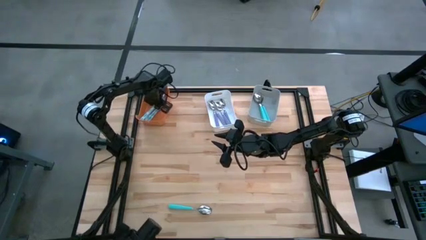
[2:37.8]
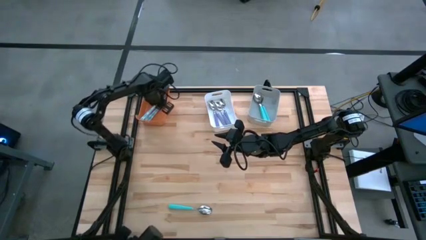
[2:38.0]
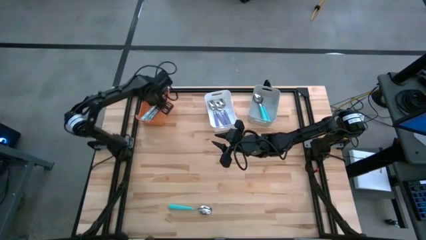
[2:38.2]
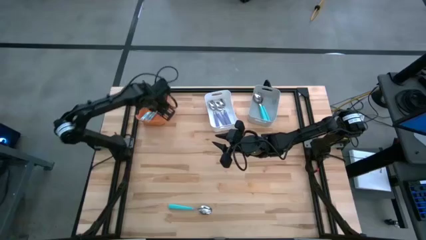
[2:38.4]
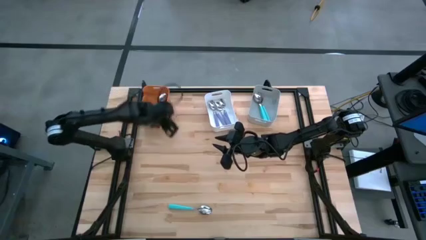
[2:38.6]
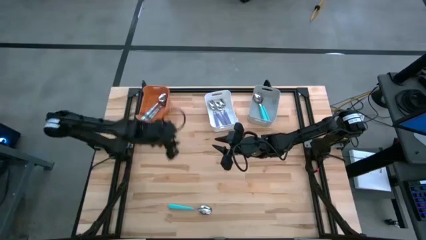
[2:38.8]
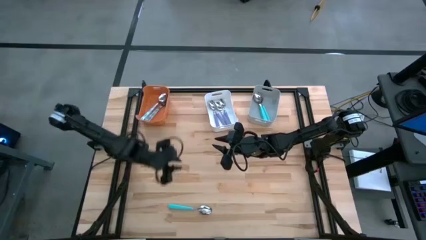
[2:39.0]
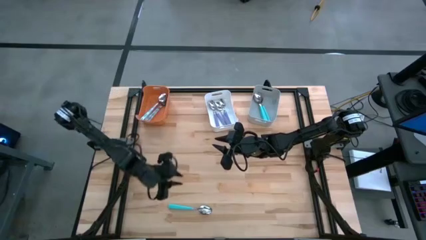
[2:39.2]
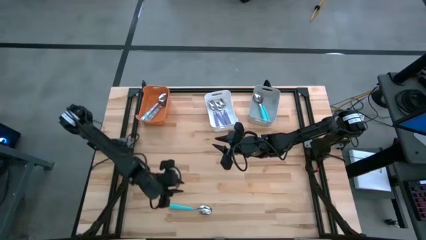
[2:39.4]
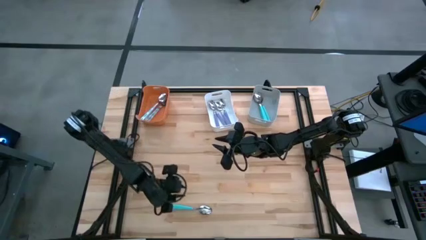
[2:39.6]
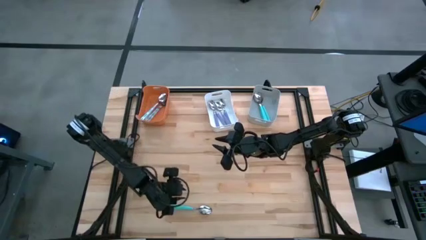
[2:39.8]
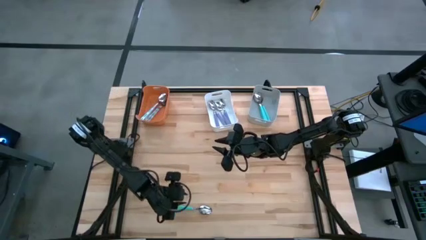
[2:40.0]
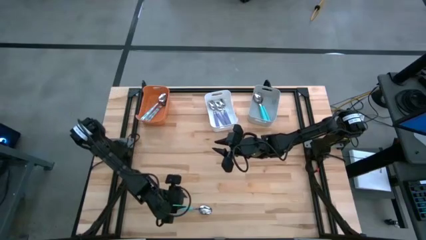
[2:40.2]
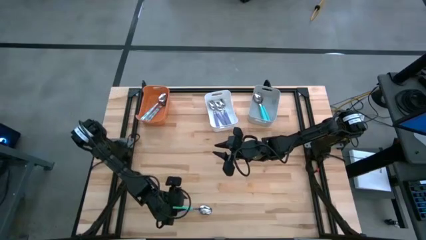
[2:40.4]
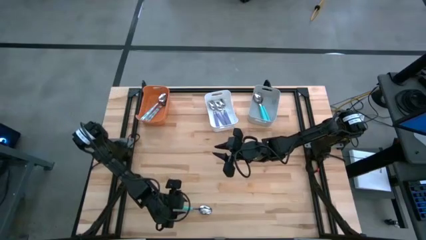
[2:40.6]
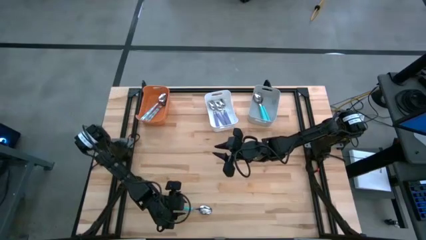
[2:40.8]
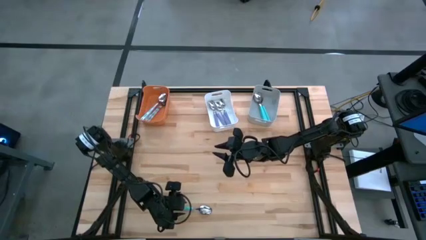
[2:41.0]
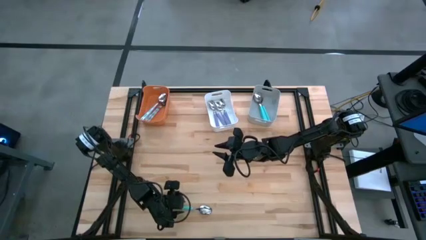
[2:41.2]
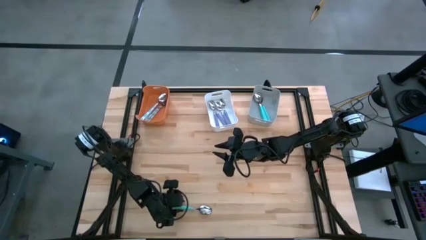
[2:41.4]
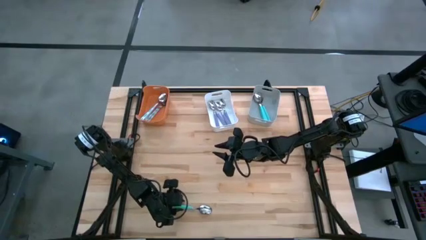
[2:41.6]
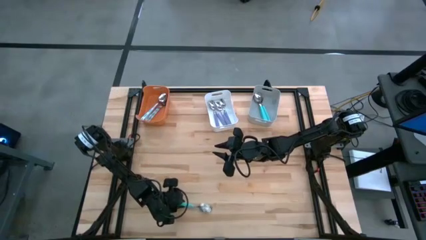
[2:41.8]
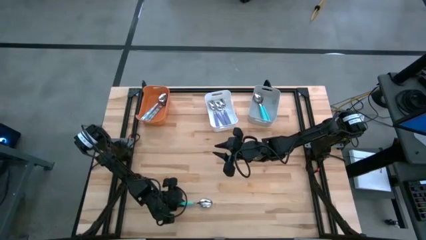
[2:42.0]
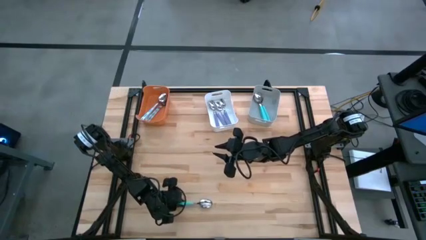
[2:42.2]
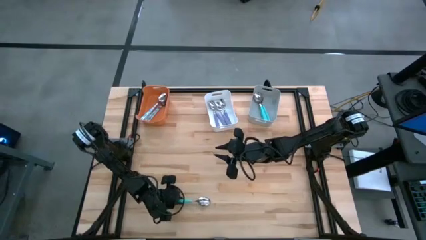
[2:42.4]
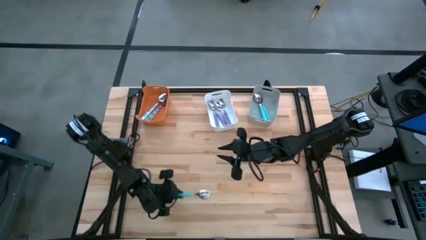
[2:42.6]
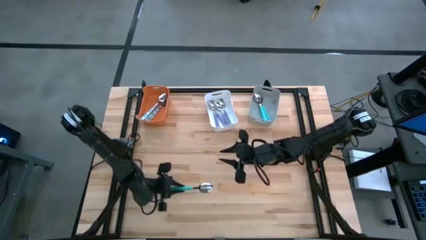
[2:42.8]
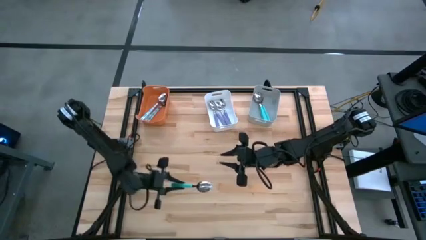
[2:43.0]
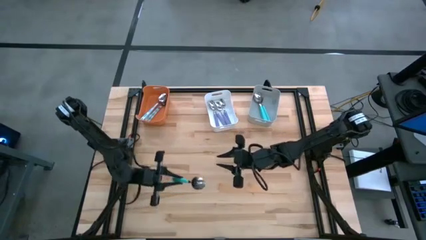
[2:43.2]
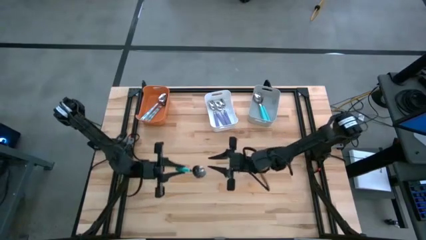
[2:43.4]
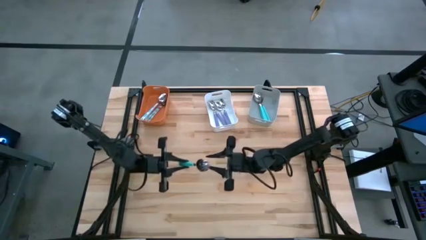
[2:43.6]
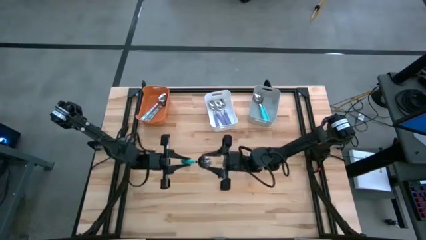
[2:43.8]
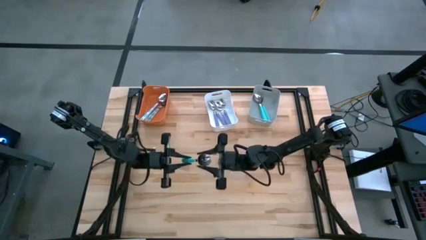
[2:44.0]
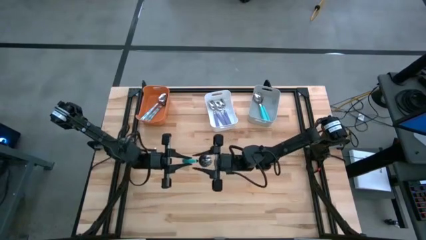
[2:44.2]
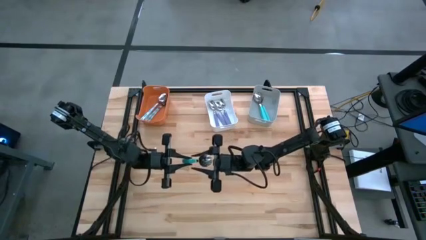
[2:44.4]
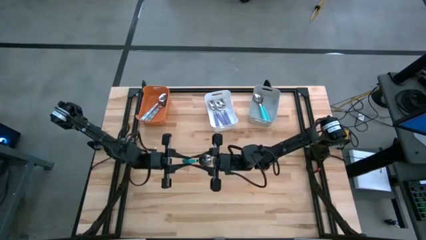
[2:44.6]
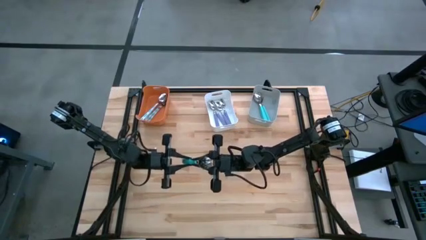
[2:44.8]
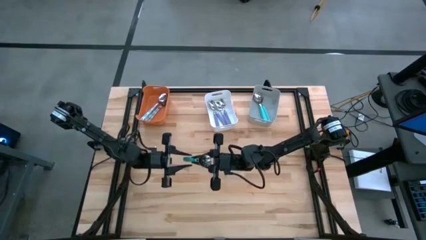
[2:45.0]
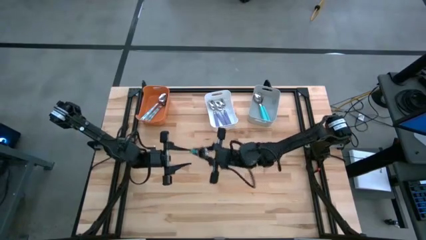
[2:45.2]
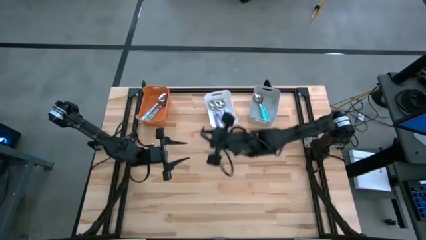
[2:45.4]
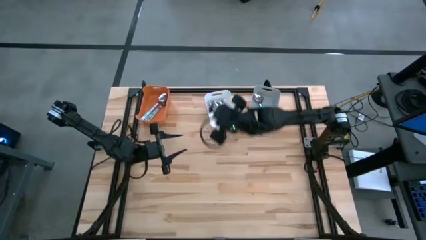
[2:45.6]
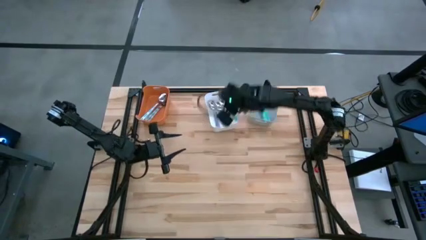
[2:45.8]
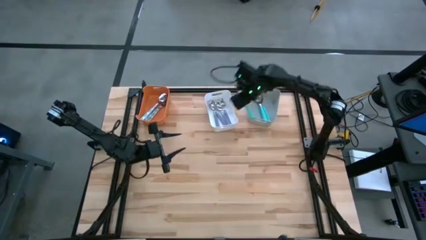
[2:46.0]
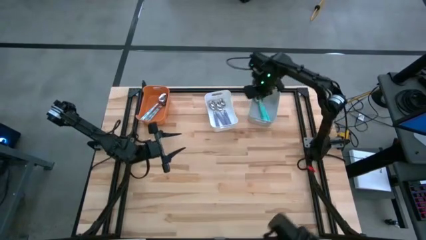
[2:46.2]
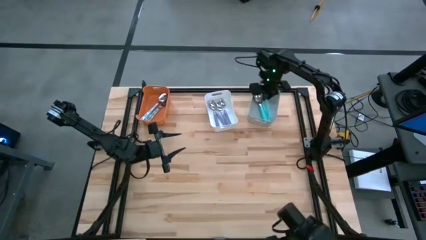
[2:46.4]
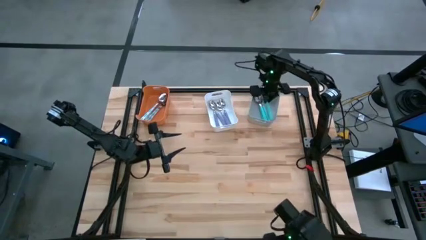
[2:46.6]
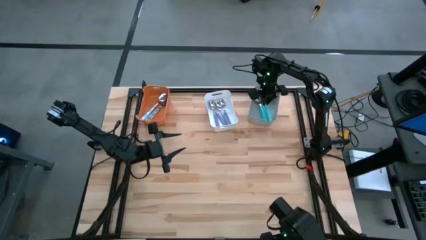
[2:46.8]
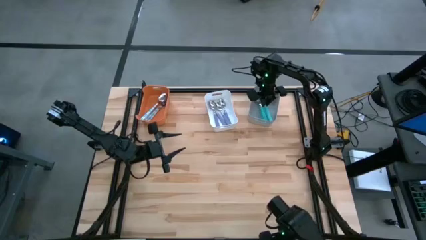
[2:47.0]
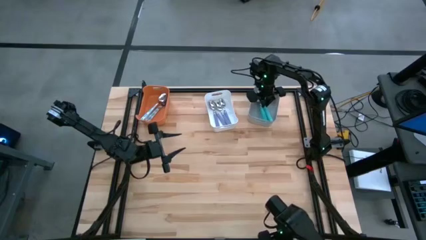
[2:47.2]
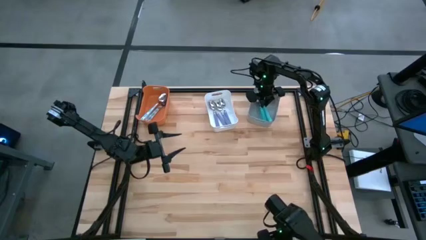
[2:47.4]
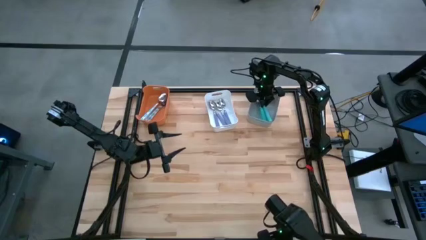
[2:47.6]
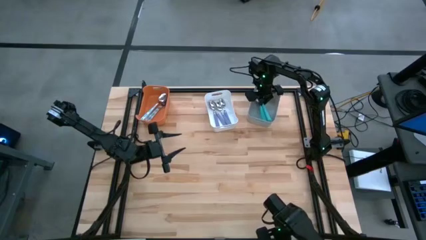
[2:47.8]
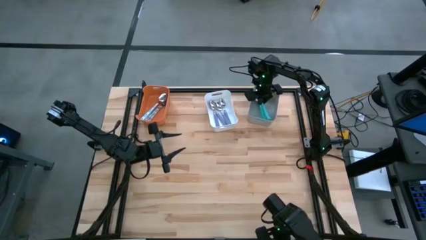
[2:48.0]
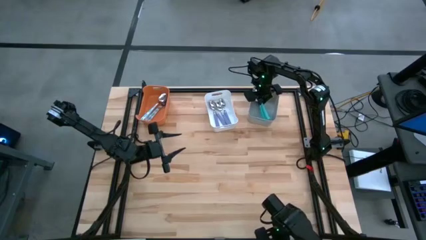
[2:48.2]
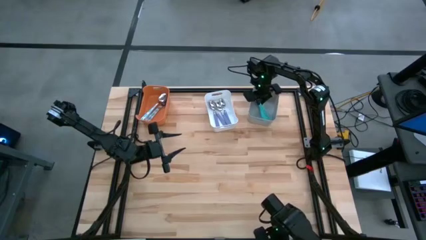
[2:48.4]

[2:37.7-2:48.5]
Task: Sort silverware by color (type)
Put the blue spoon into the gray bin

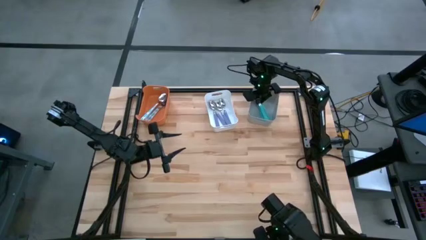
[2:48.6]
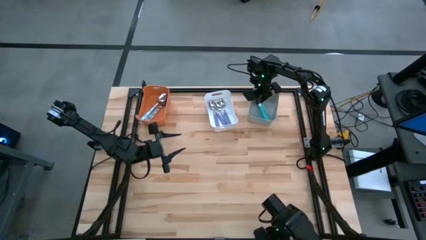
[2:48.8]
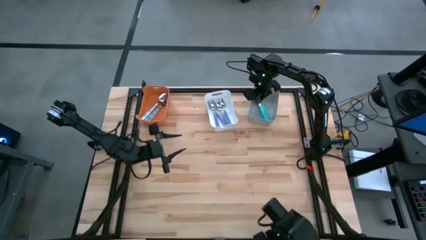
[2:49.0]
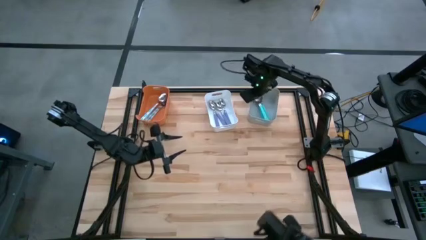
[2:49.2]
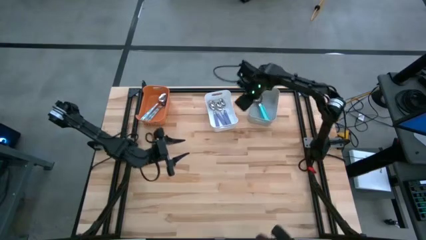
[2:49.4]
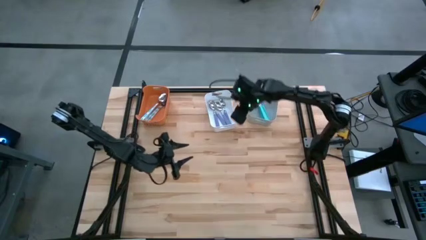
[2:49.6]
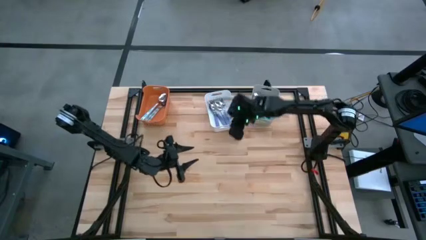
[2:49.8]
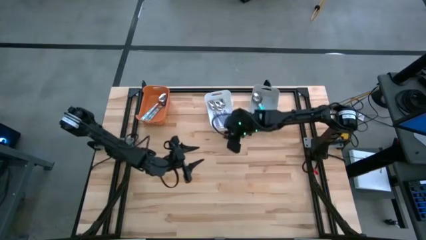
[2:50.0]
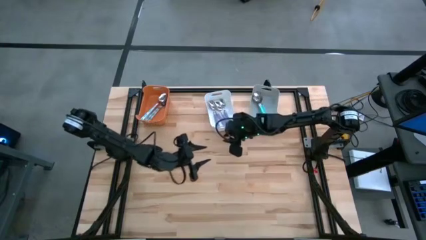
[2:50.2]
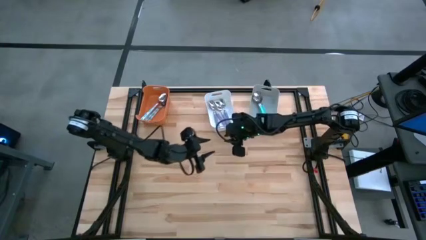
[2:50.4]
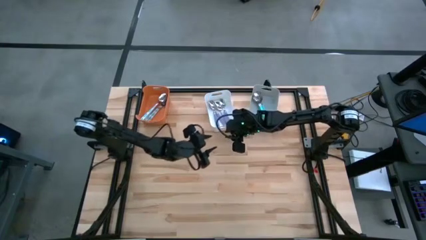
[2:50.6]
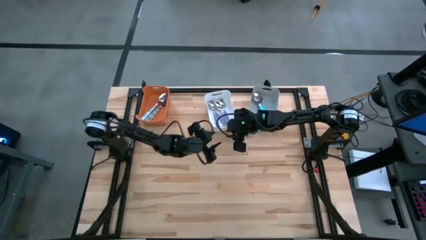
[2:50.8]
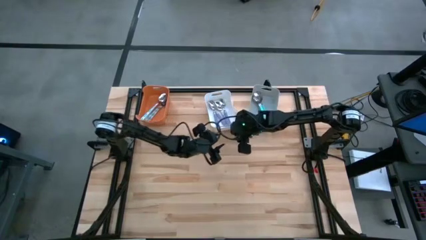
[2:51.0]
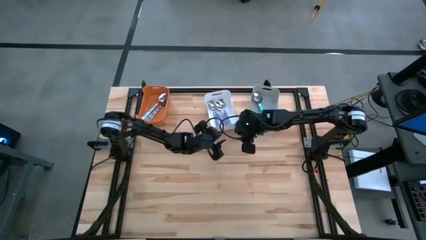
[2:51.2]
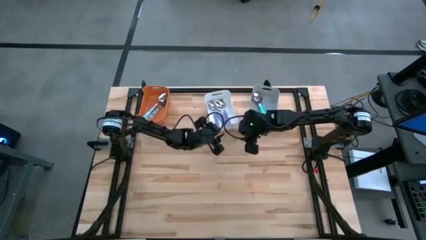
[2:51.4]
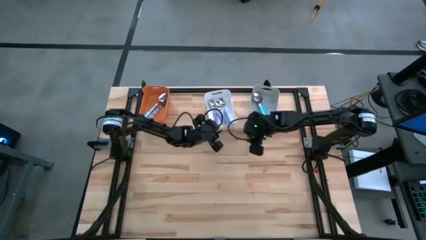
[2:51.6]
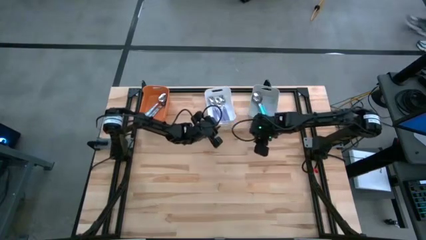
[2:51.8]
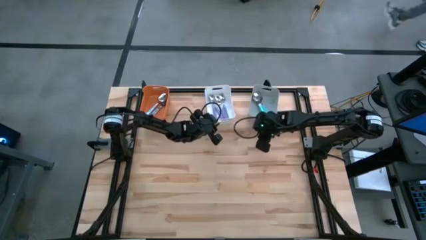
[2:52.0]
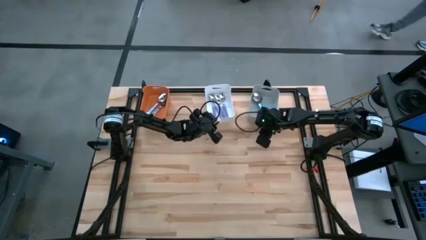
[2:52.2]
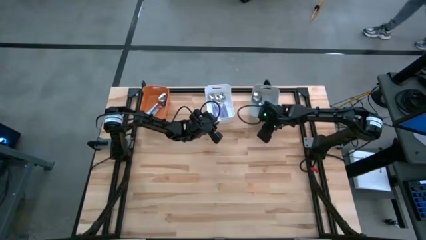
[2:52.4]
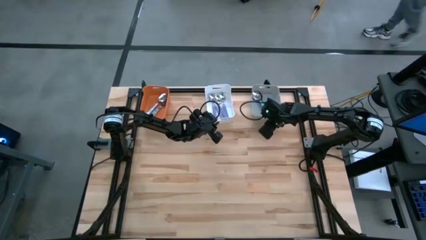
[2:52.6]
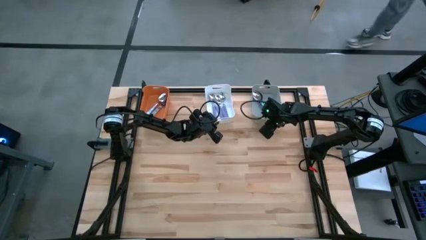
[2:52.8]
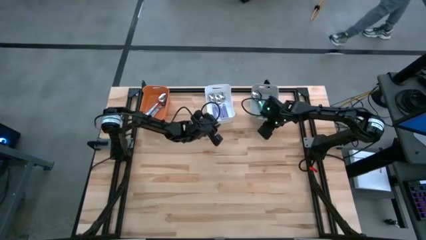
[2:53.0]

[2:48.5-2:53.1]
Adjust the bins
